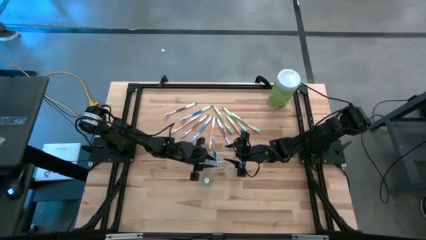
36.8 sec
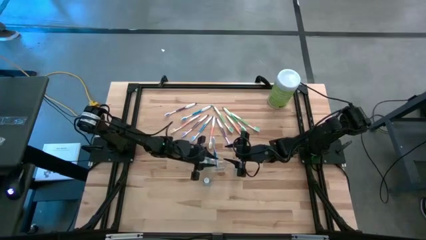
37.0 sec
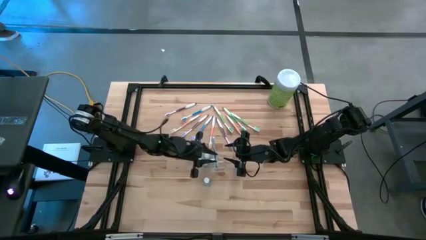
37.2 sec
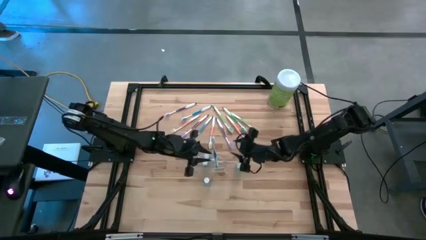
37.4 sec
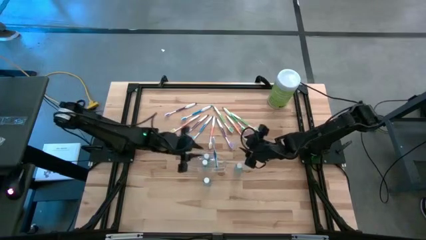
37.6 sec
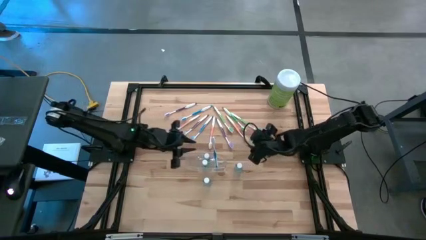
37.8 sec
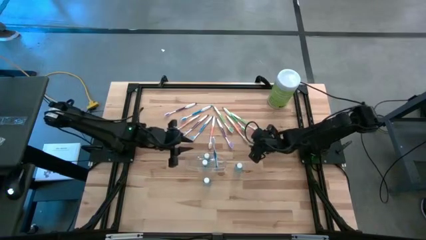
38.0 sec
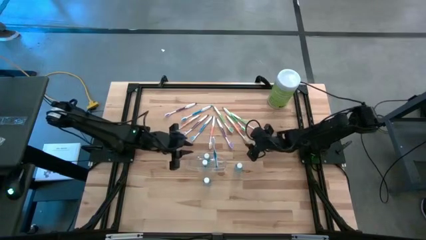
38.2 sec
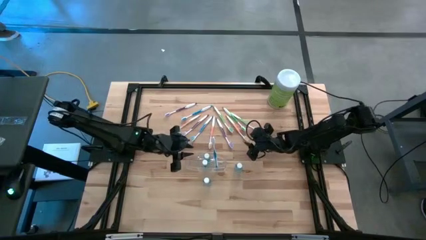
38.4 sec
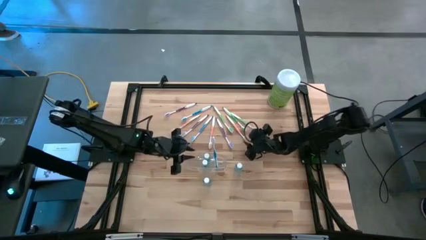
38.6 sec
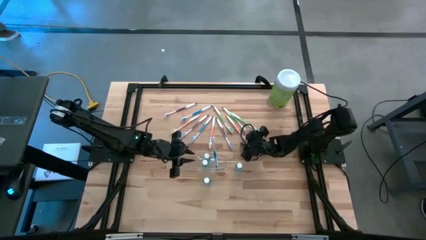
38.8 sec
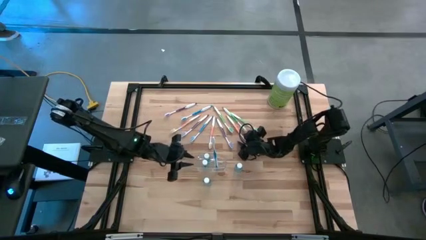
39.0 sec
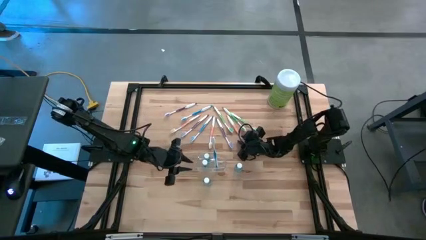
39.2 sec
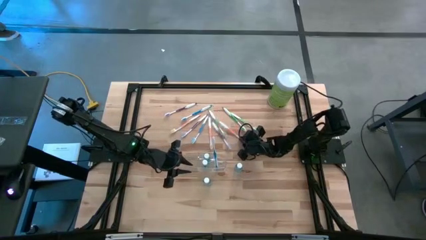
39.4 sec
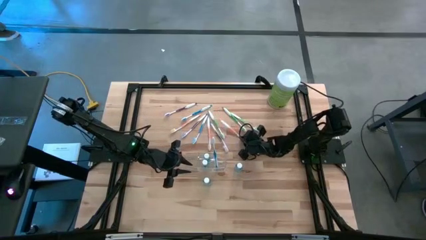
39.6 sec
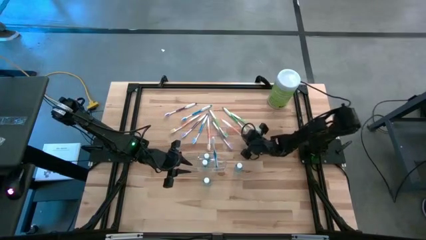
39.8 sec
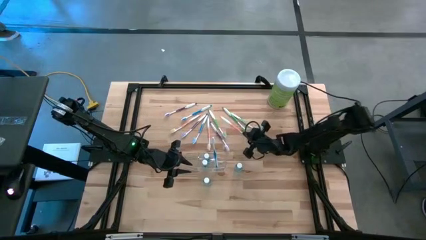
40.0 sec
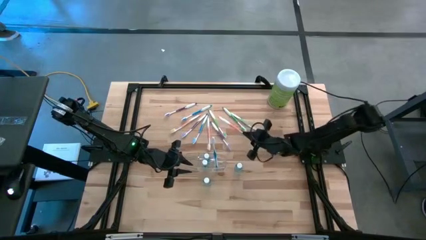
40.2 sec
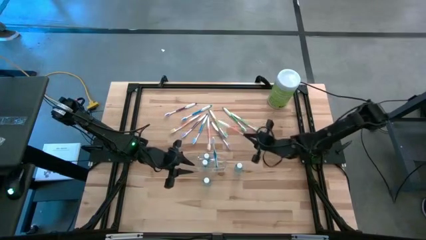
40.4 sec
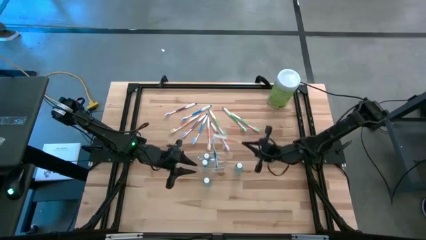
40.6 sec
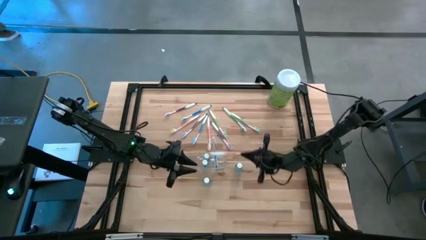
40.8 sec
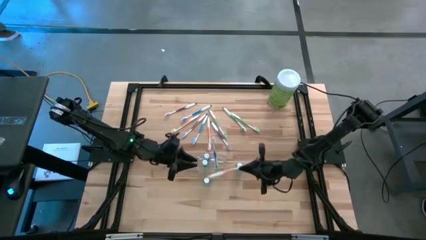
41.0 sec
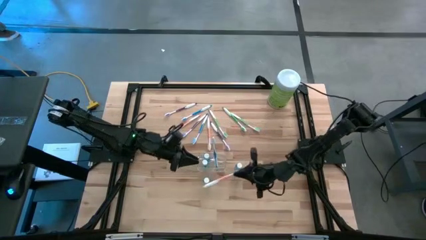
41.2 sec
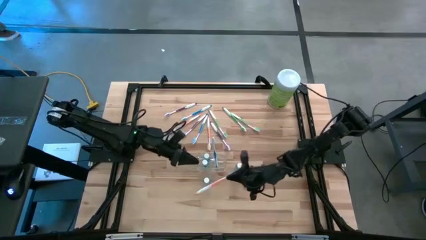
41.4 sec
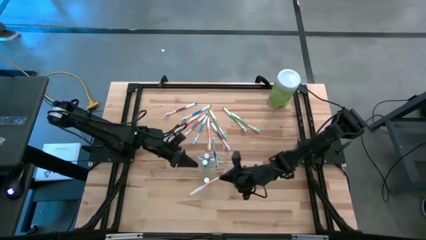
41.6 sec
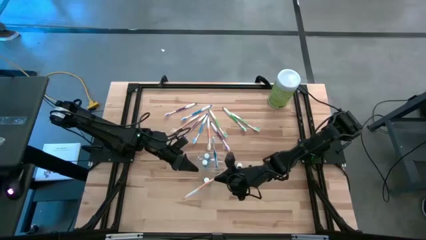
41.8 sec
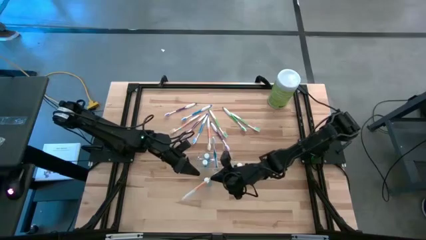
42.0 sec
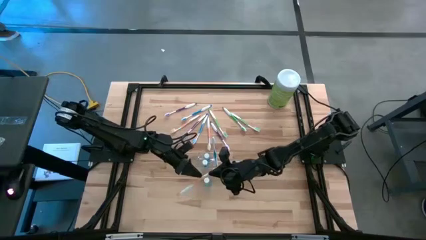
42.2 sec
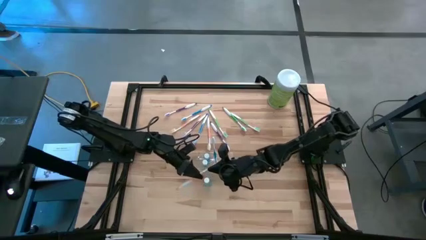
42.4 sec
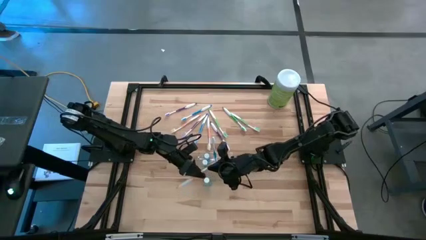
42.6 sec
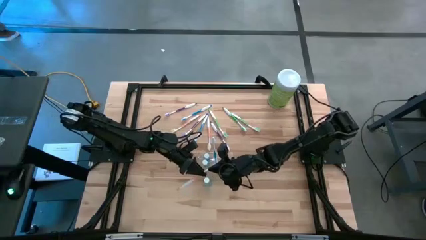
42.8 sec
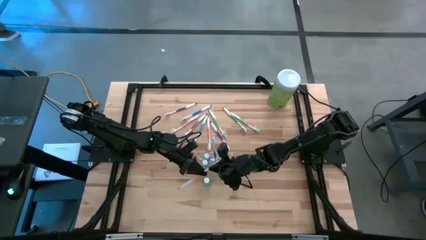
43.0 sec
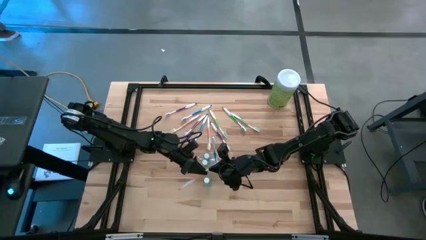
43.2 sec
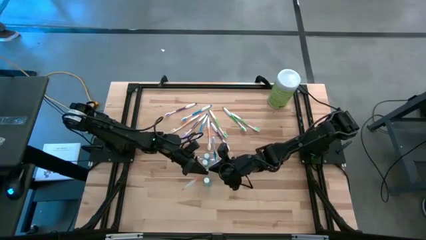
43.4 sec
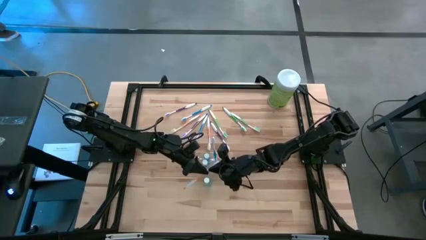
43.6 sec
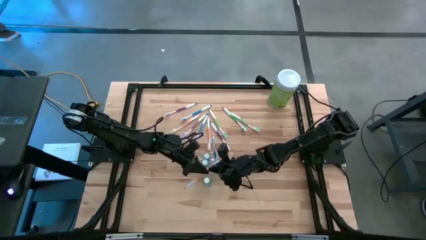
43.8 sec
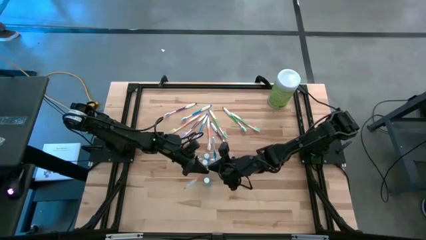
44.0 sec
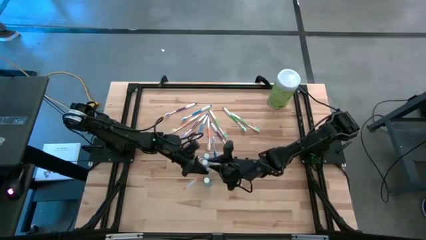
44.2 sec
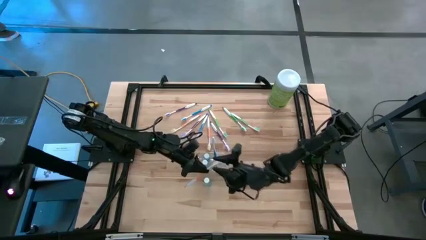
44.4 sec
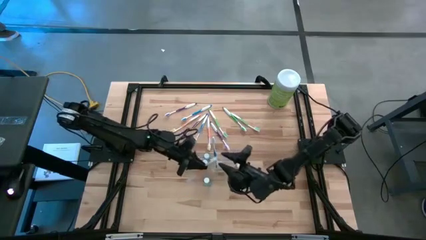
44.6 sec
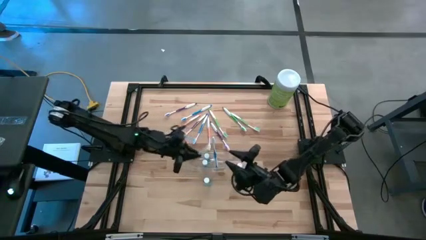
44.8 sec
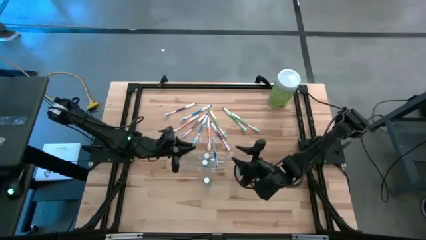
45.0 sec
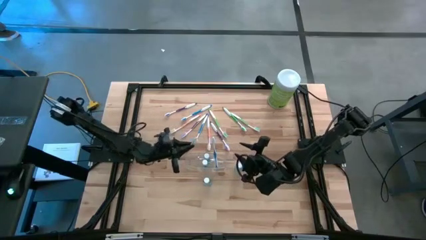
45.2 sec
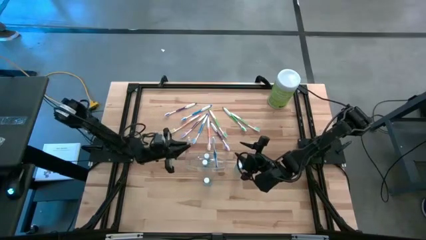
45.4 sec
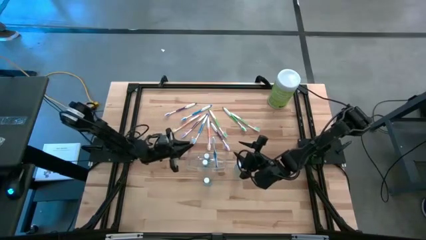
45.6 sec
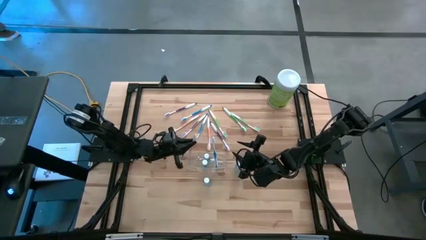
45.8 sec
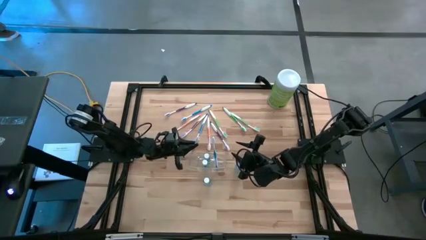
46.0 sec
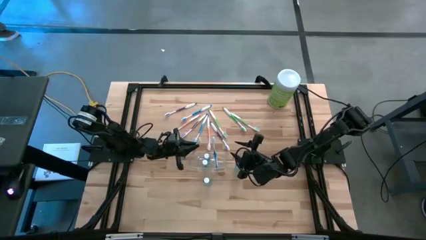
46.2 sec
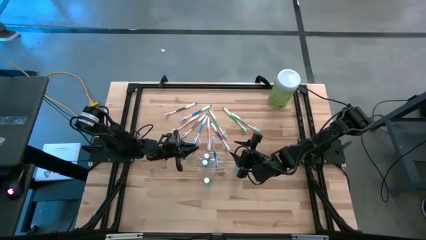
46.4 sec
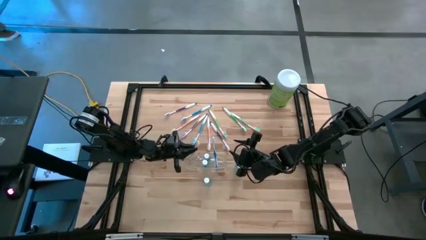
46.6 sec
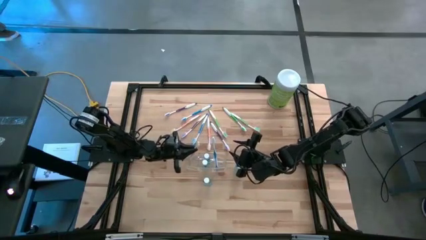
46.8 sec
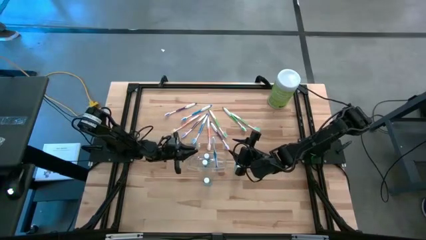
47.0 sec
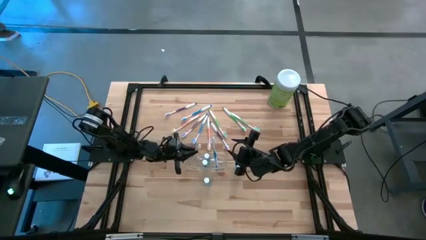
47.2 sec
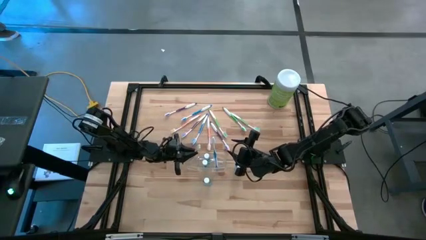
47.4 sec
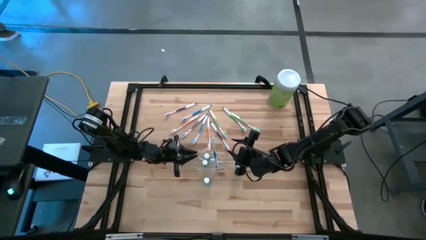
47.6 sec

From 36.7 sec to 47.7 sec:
Task: Pick & Place toothbrushing station
Put the orange toothbrush into the transparent organizer
